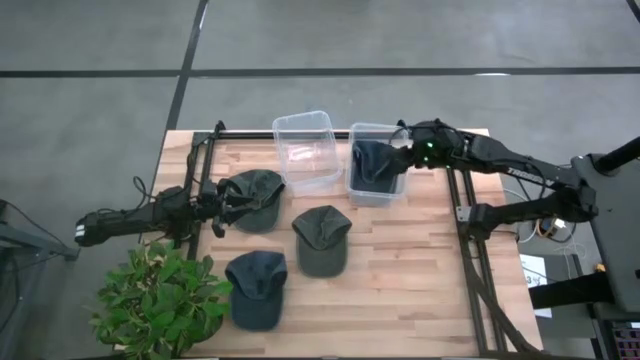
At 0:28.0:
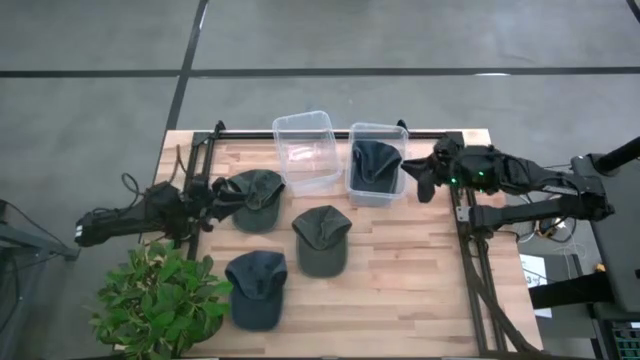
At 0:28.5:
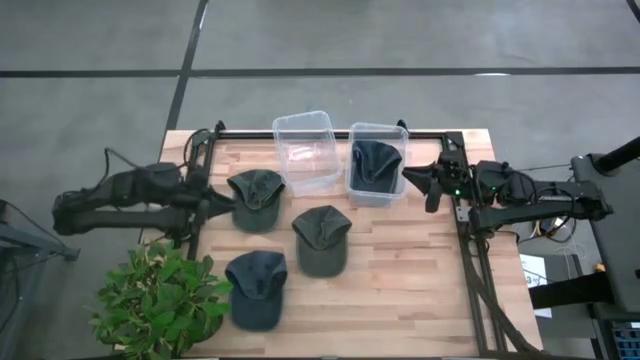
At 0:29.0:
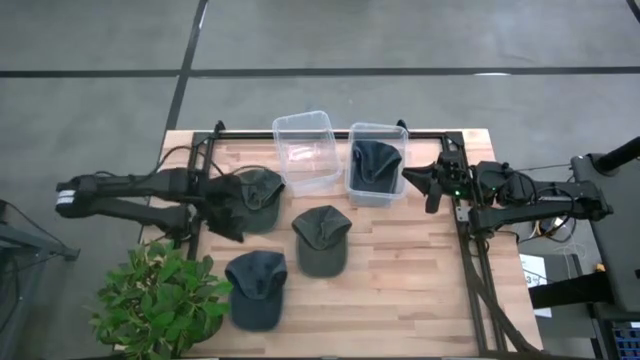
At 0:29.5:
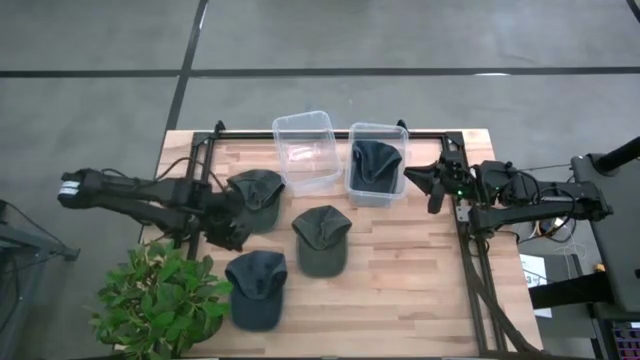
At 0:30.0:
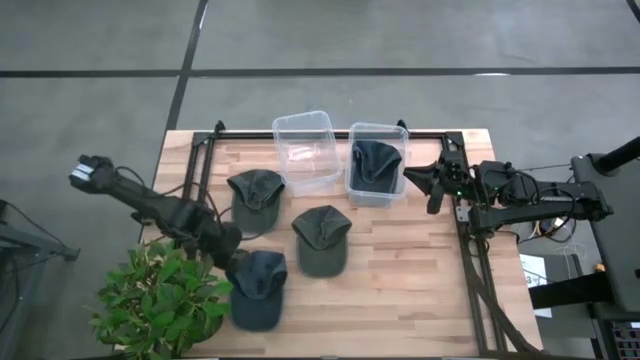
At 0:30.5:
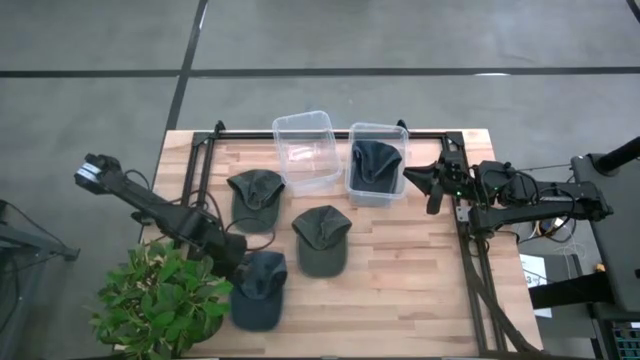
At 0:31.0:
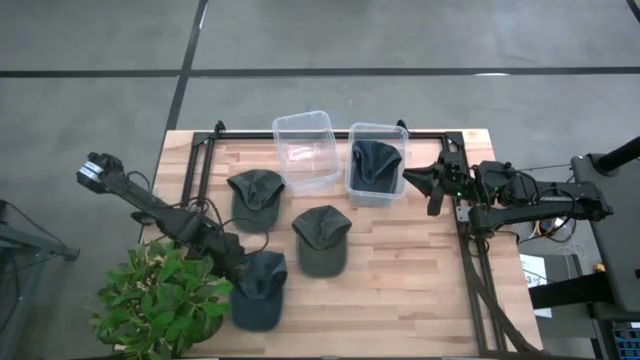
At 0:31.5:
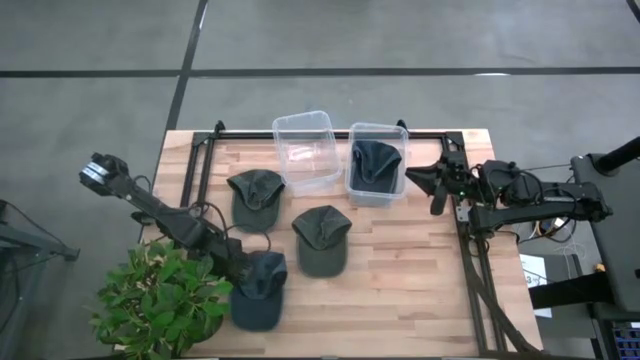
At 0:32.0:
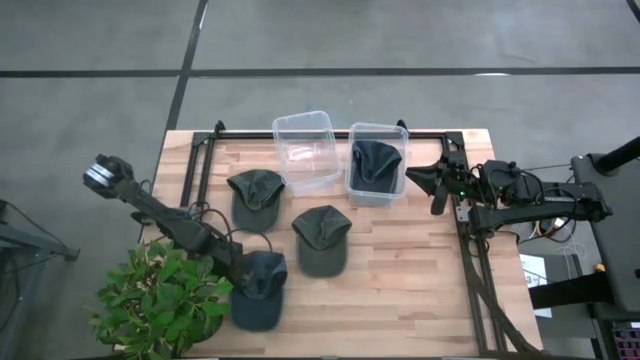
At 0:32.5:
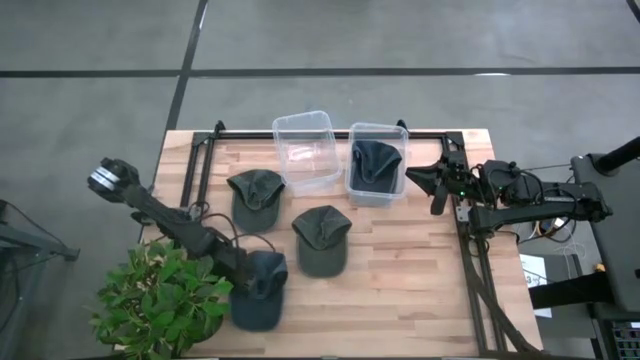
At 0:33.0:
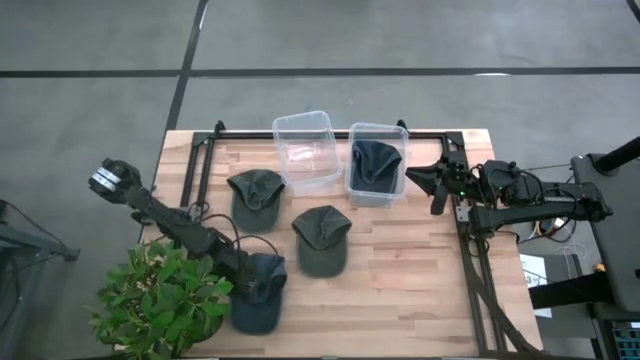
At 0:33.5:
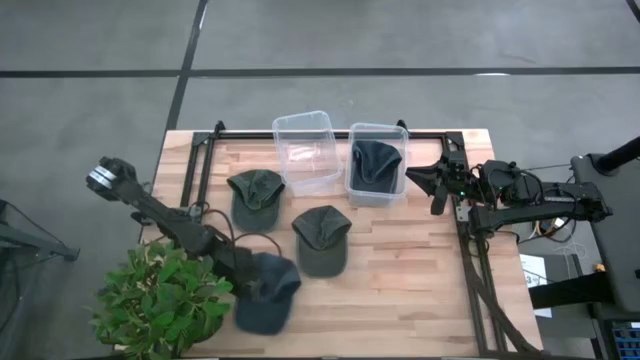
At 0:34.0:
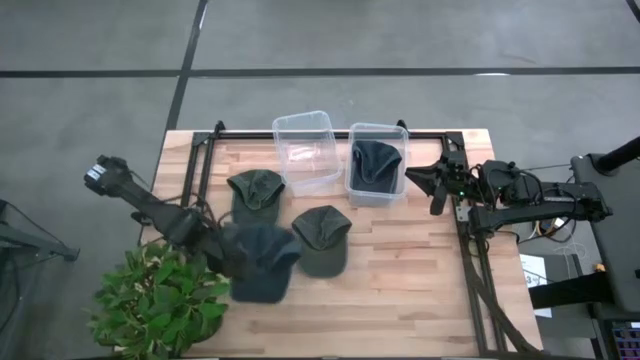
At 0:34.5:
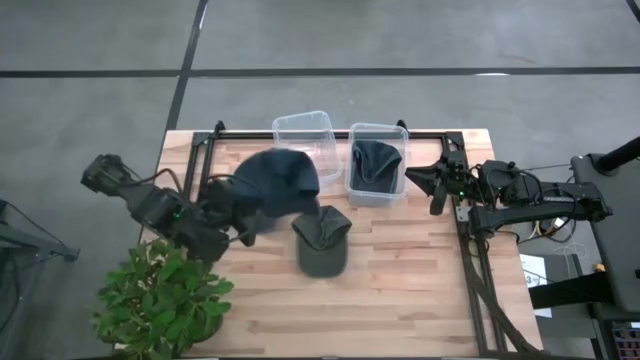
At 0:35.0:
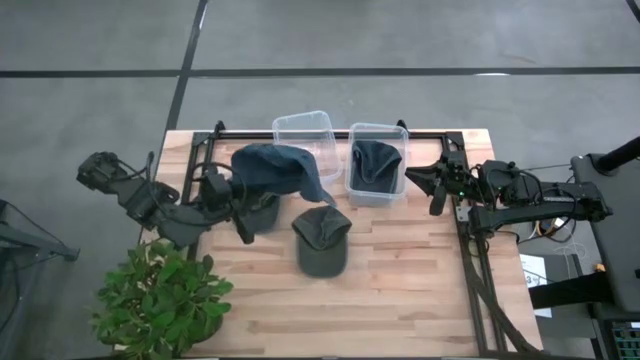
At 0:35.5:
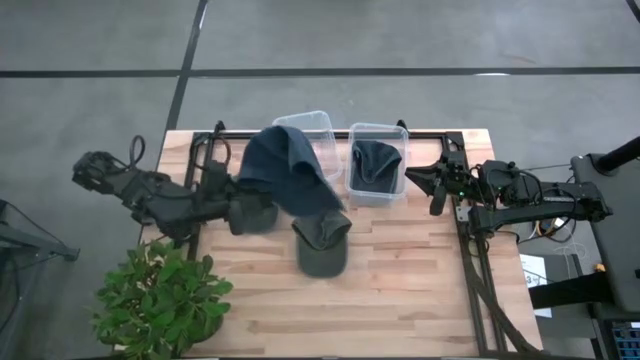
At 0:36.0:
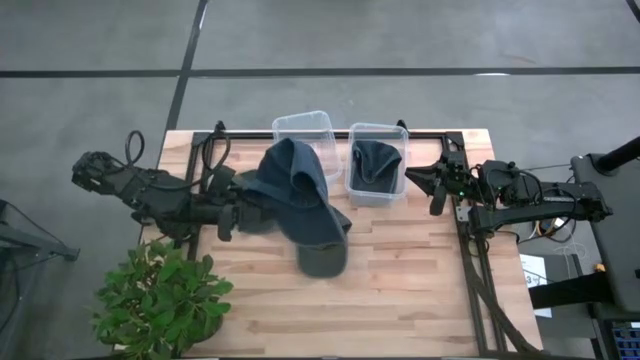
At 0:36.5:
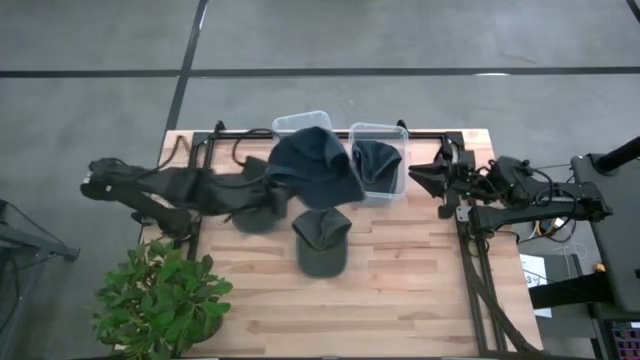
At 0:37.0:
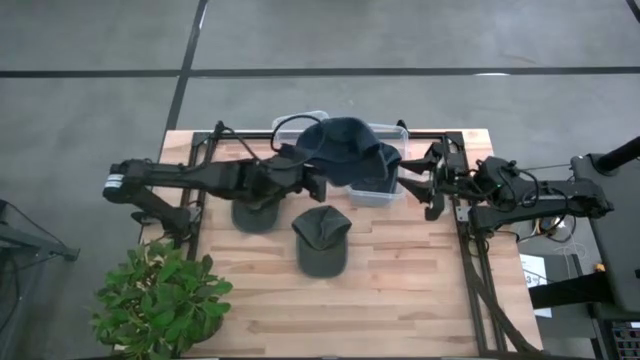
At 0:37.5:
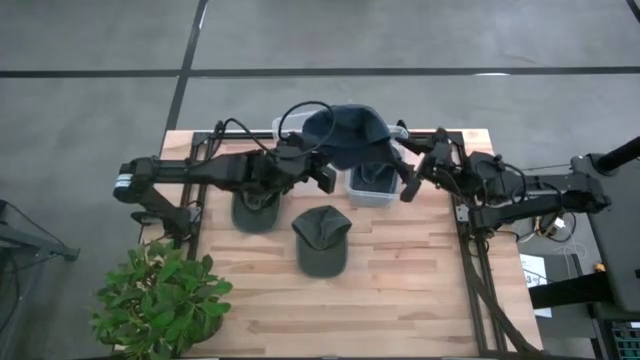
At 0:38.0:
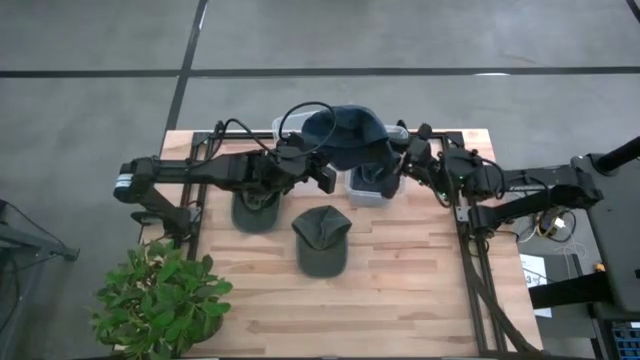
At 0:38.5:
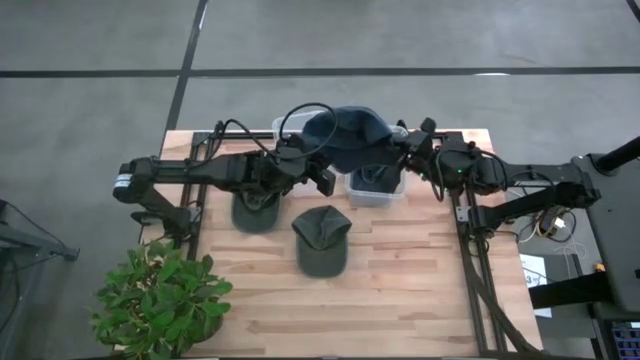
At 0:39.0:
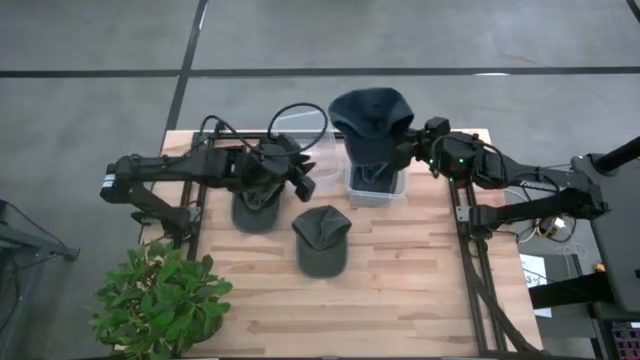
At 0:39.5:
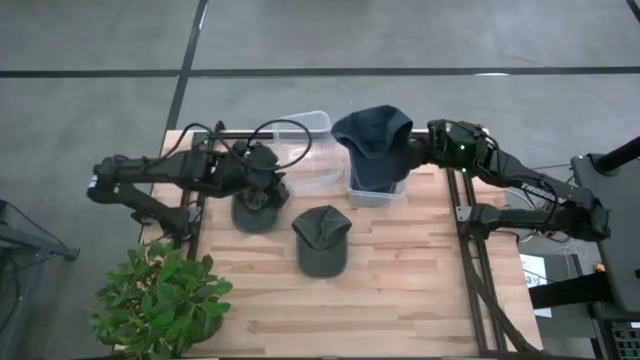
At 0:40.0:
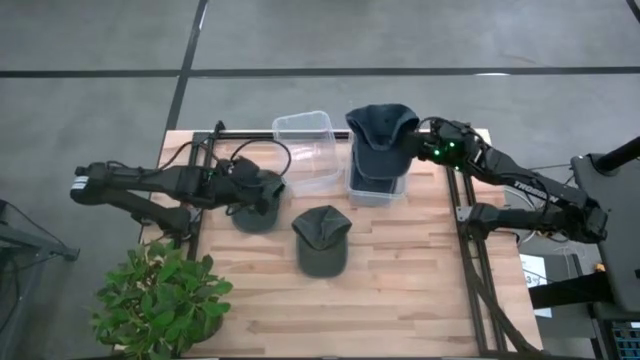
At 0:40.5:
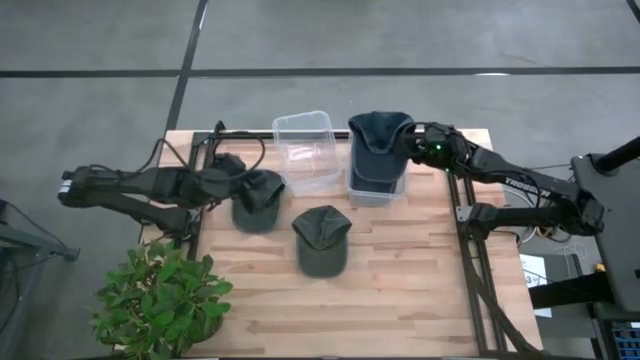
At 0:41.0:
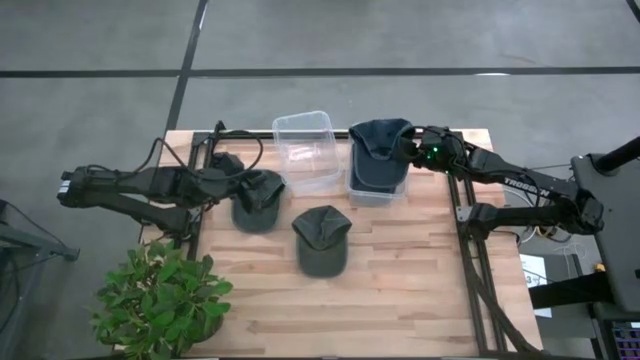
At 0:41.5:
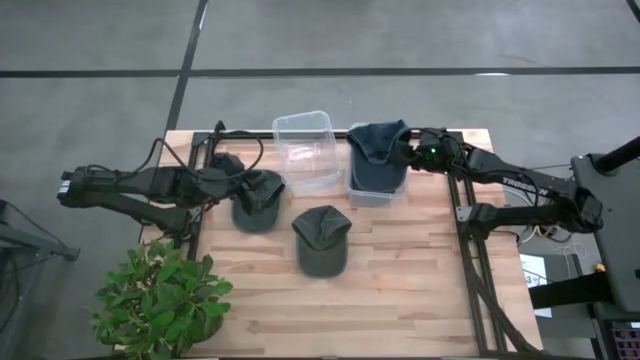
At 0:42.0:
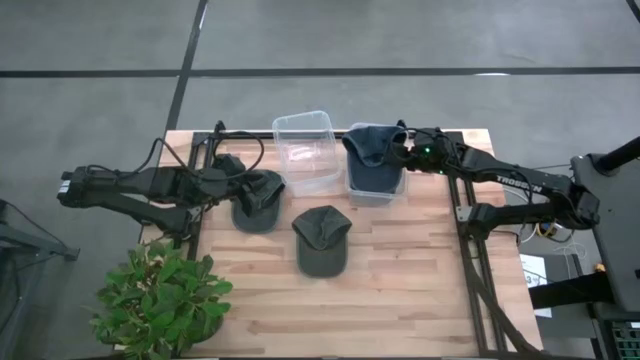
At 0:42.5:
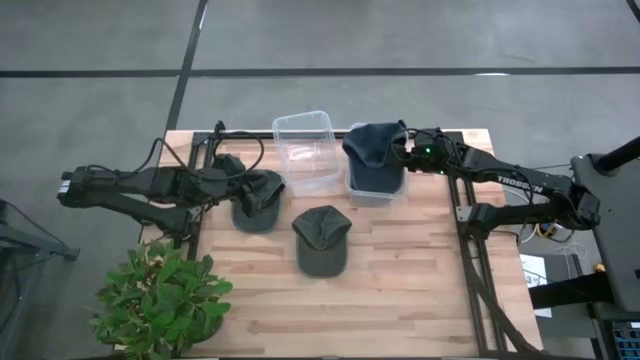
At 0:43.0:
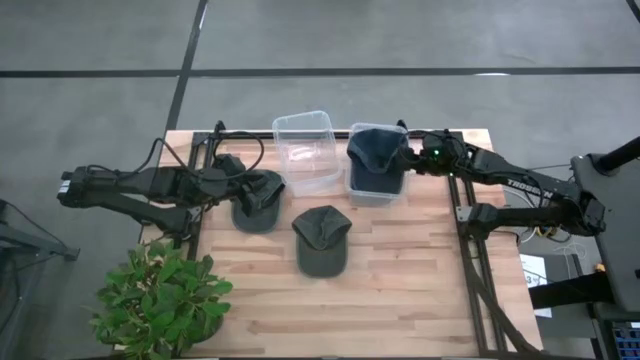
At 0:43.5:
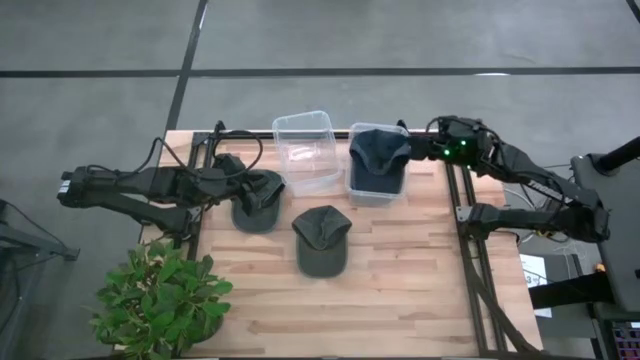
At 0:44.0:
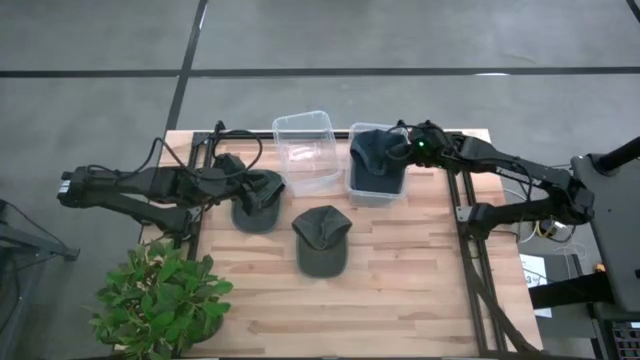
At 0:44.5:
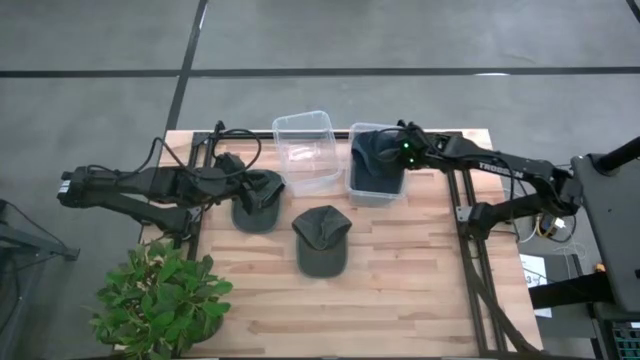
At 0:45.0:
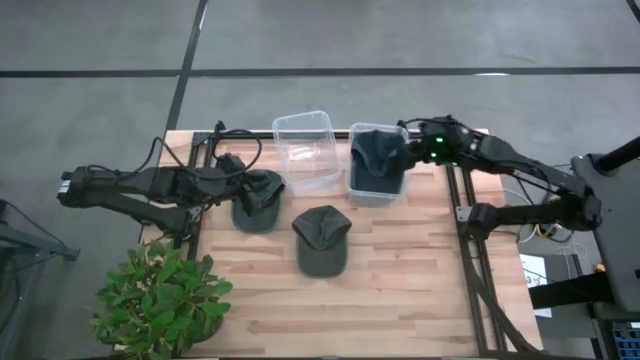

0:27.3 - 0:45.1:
Task: Pick & Place hat
Put the dark blue cap into the right transparent bin

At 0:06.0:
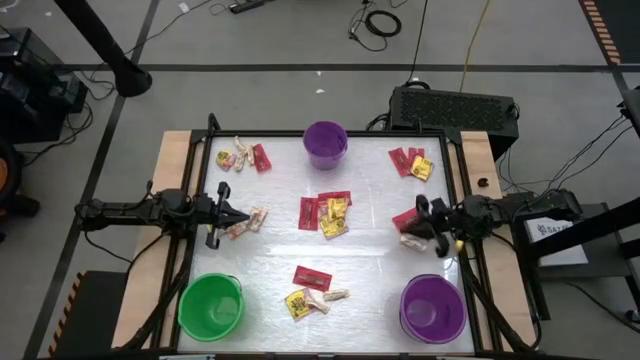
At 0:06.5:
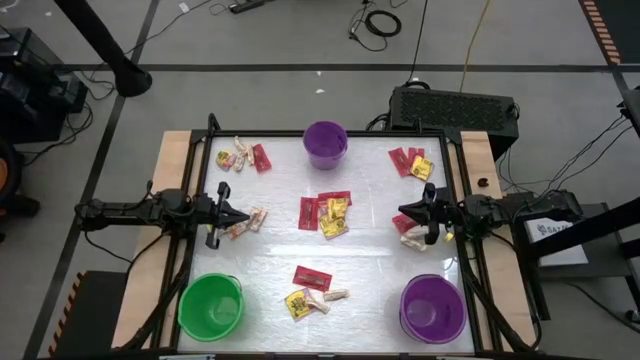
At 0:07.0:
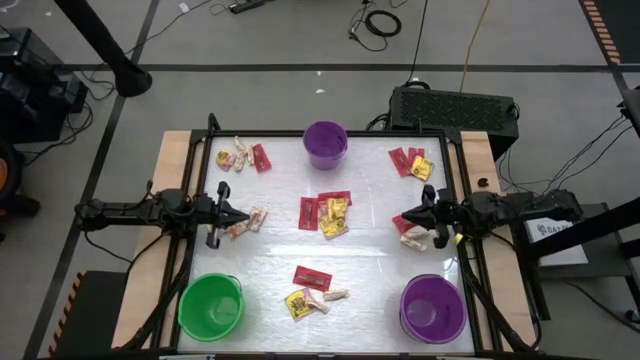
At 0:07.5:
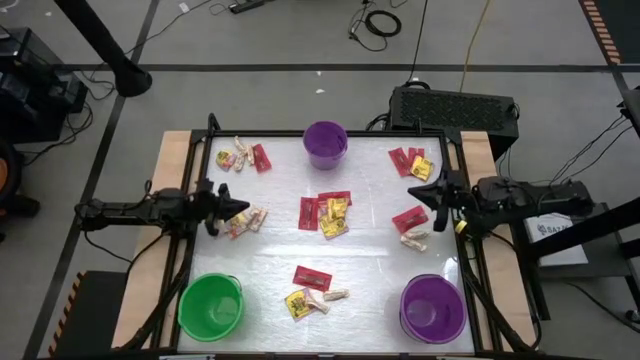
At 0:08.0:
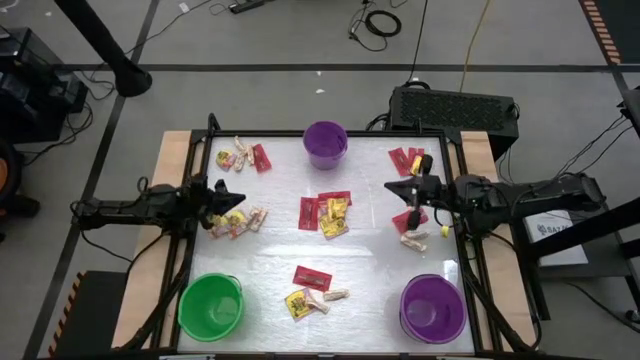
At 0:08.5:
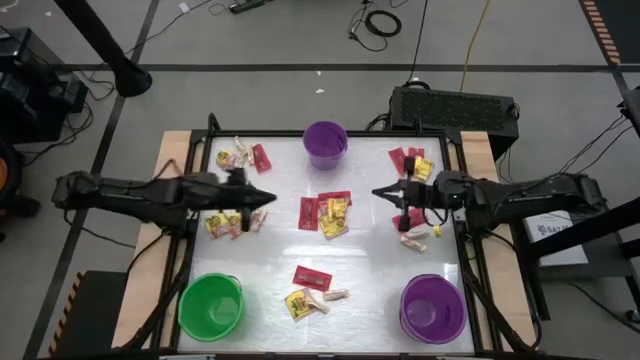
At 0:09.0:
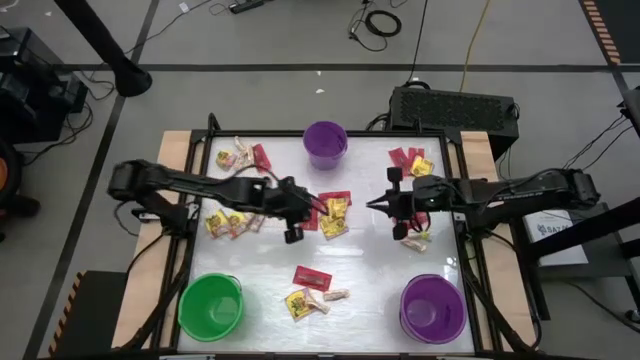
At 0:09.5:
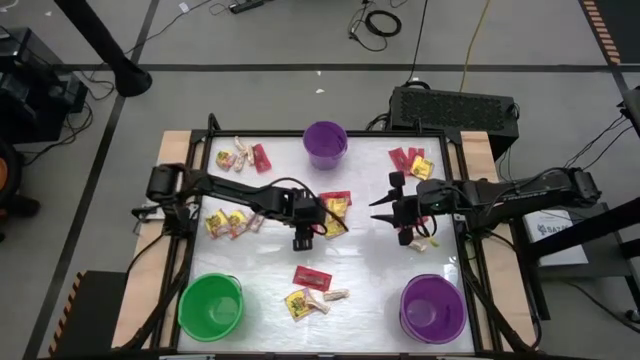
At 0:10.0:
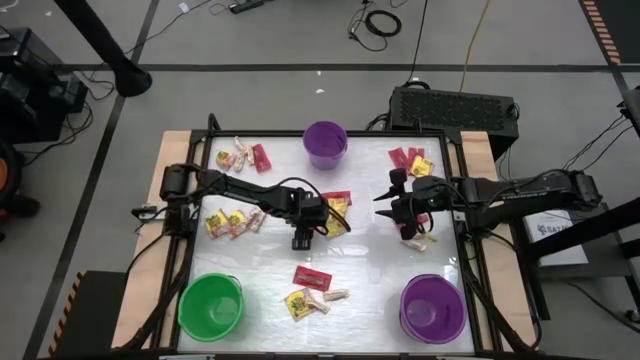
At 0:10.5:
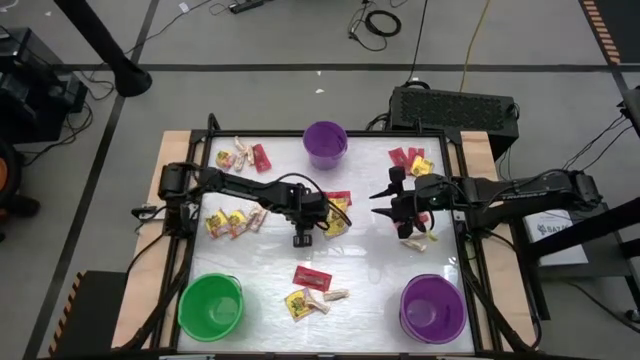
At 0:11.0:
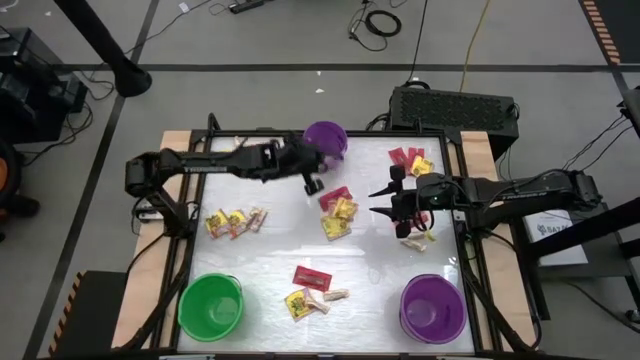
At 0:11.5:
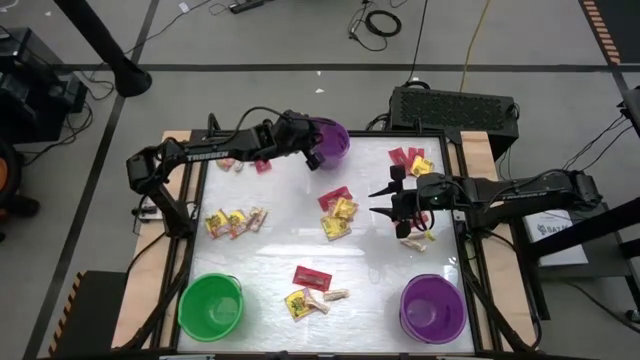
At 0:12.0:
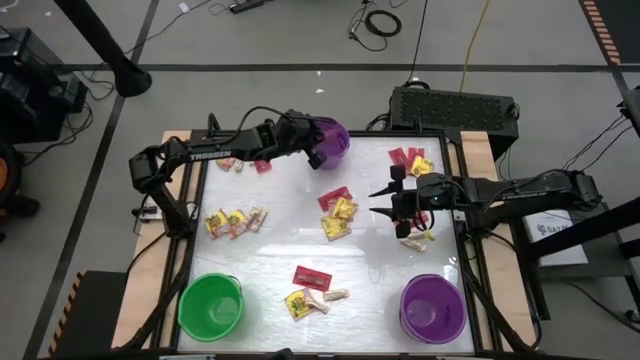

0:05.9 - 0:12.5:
Task: Sort candy by brand, put in halloween buckets
Put the red candy into the top purple bucket
